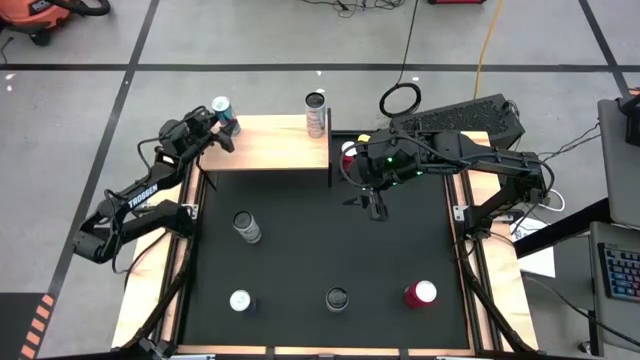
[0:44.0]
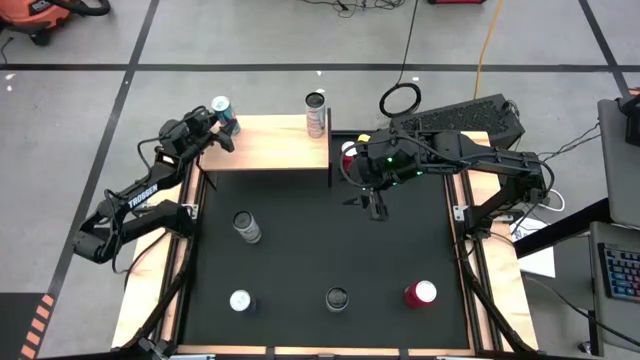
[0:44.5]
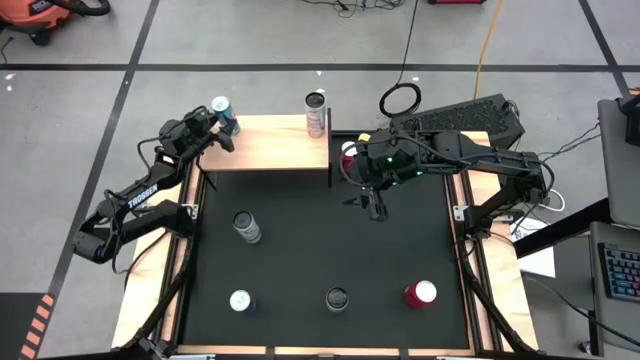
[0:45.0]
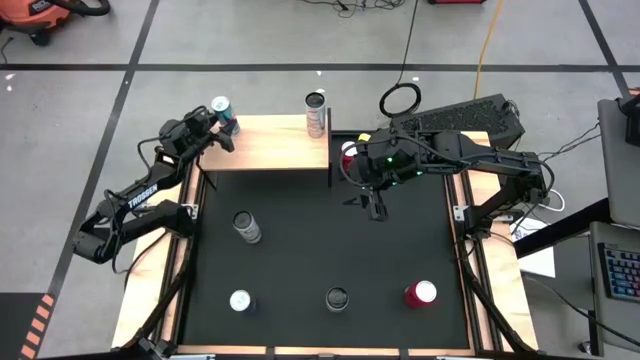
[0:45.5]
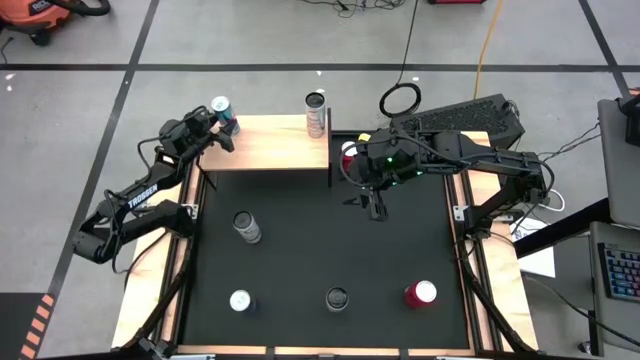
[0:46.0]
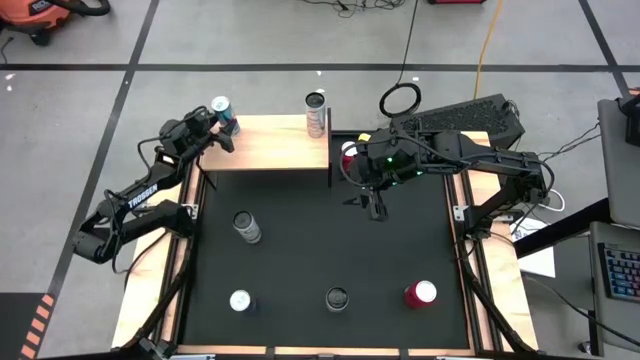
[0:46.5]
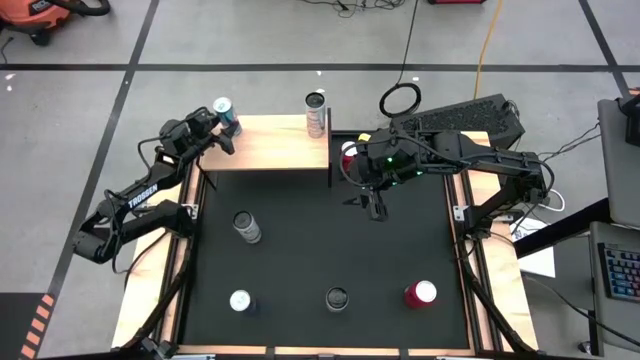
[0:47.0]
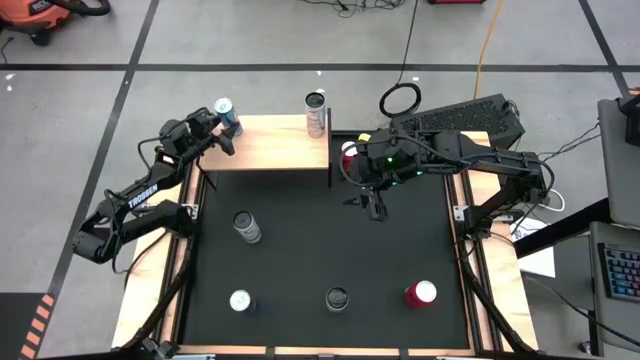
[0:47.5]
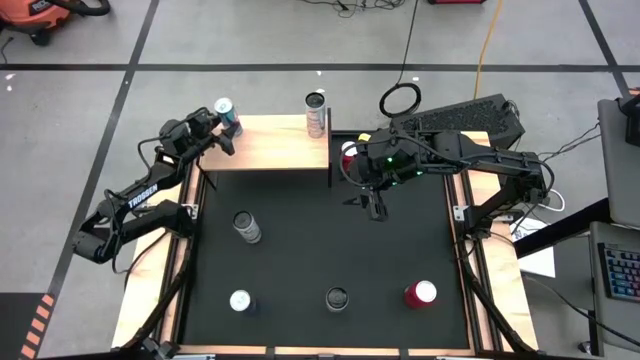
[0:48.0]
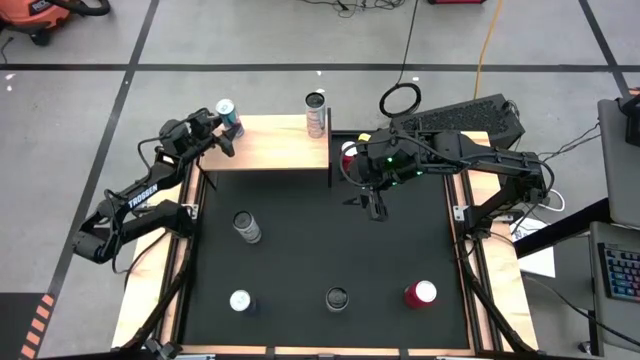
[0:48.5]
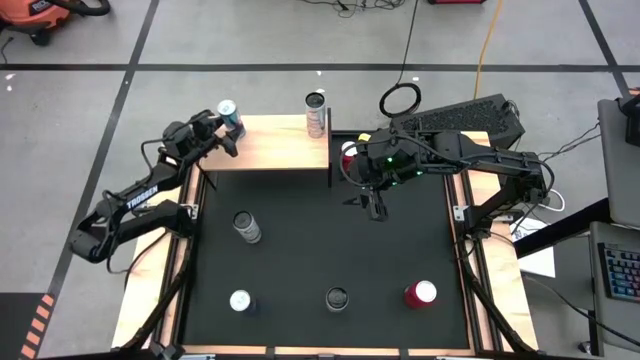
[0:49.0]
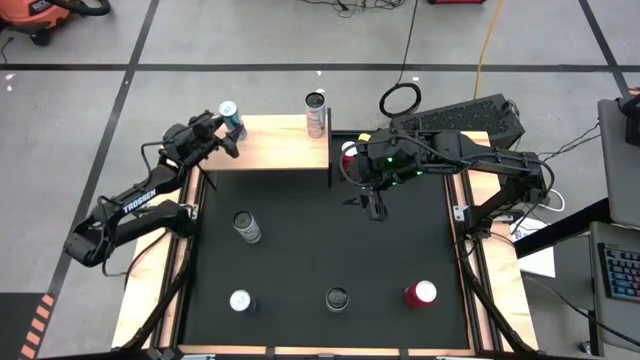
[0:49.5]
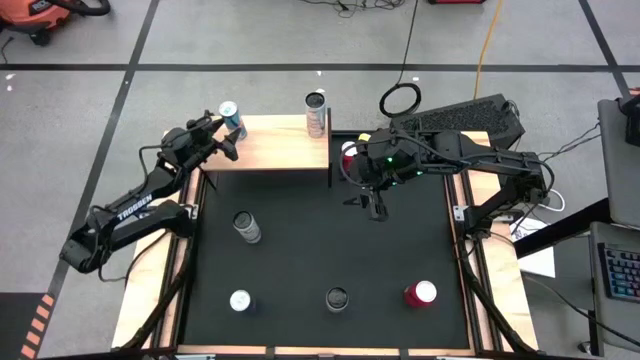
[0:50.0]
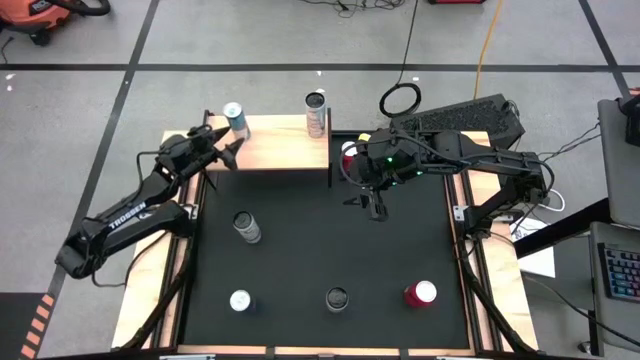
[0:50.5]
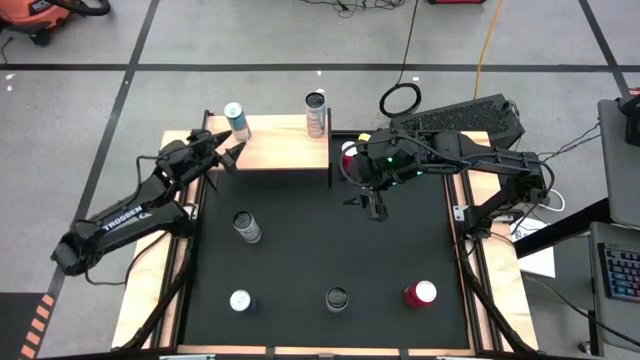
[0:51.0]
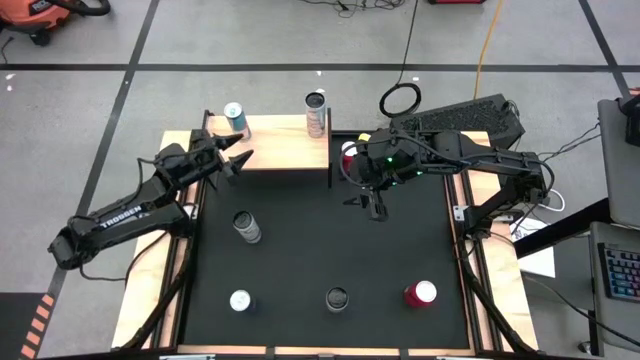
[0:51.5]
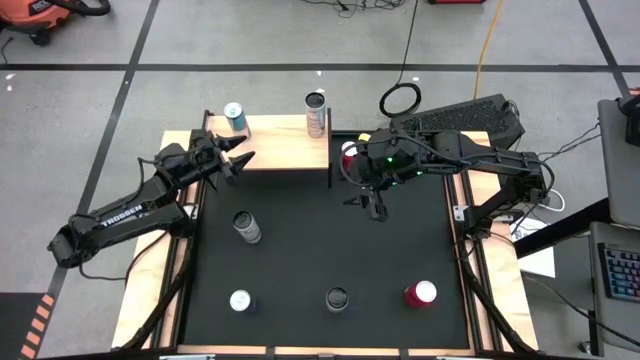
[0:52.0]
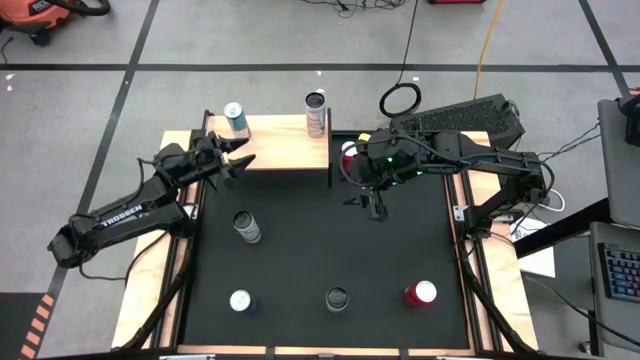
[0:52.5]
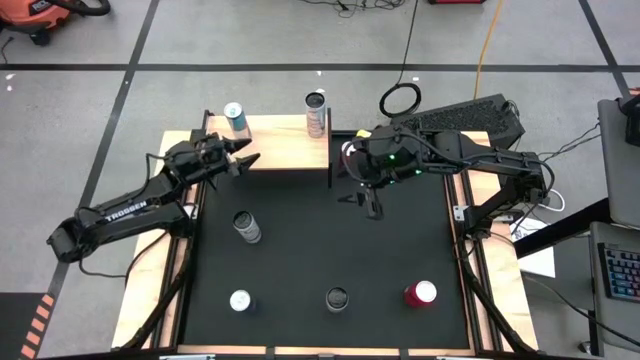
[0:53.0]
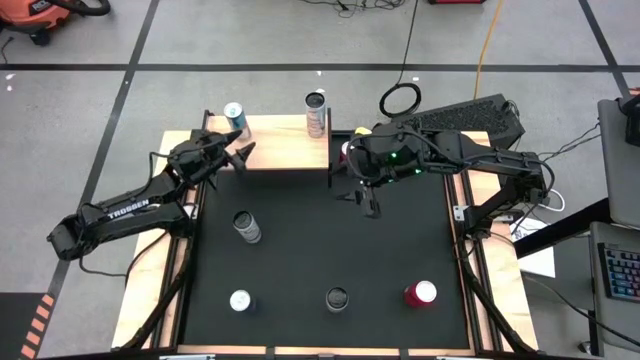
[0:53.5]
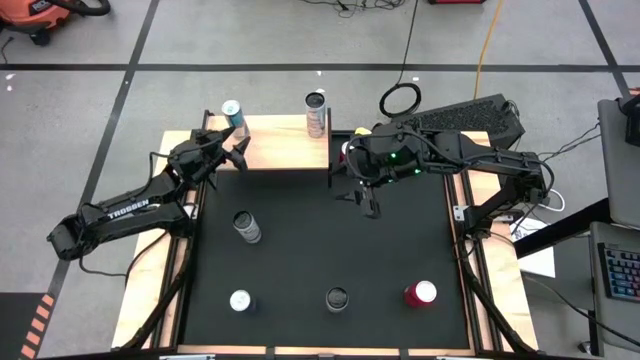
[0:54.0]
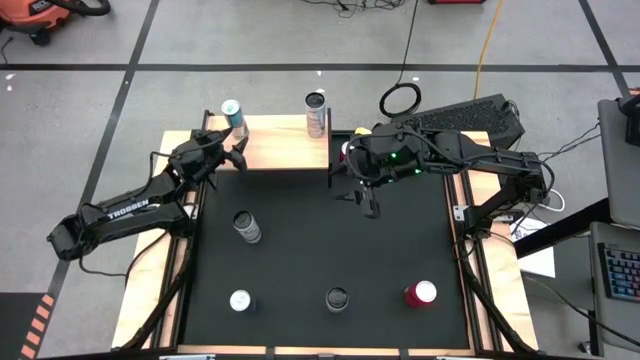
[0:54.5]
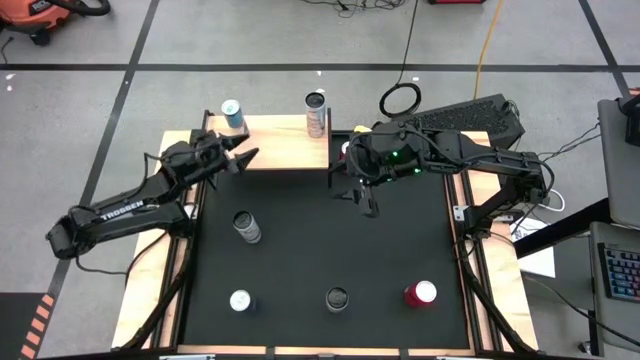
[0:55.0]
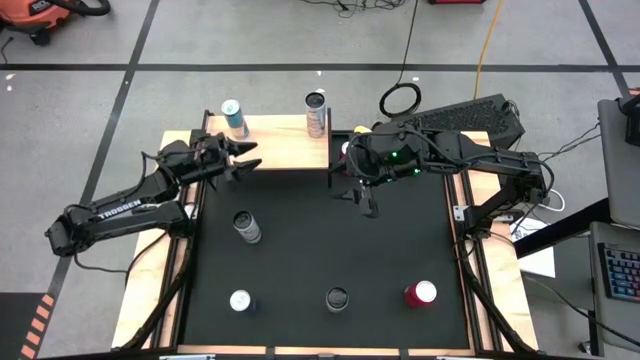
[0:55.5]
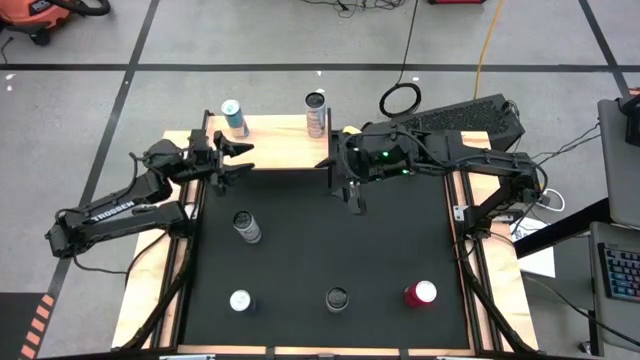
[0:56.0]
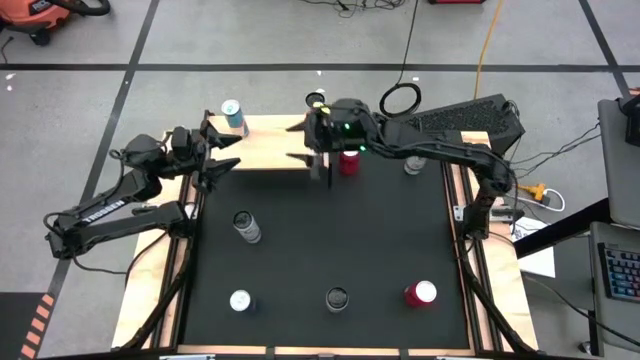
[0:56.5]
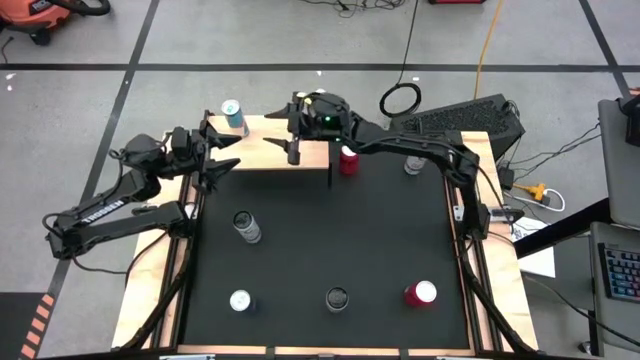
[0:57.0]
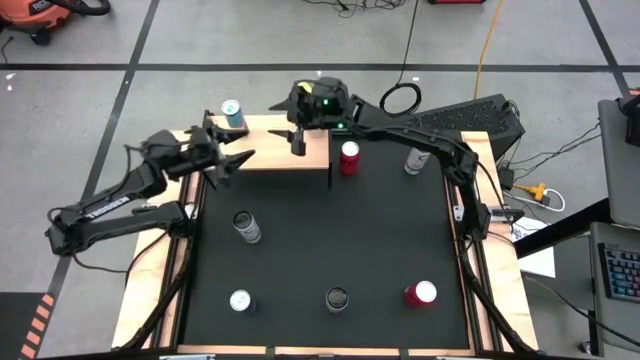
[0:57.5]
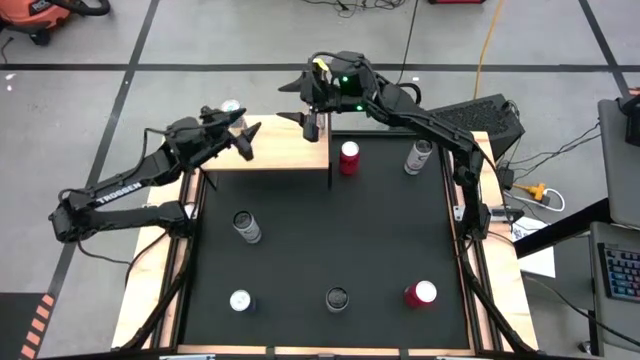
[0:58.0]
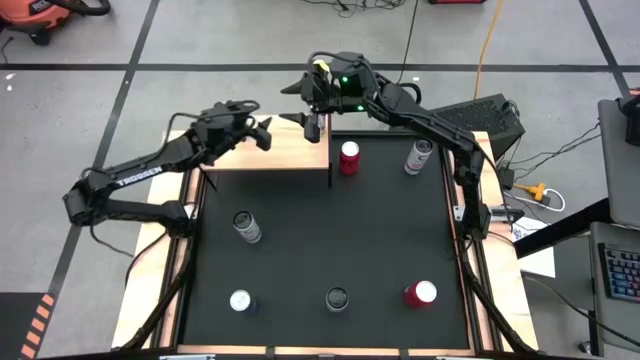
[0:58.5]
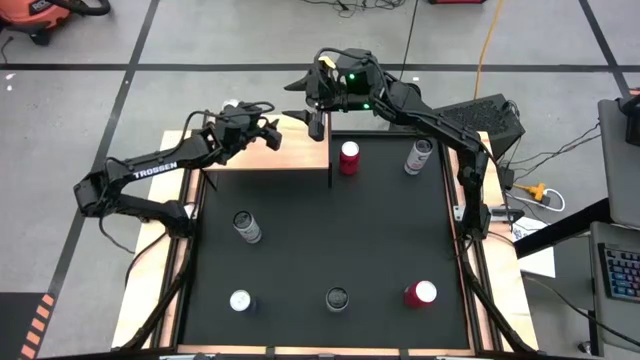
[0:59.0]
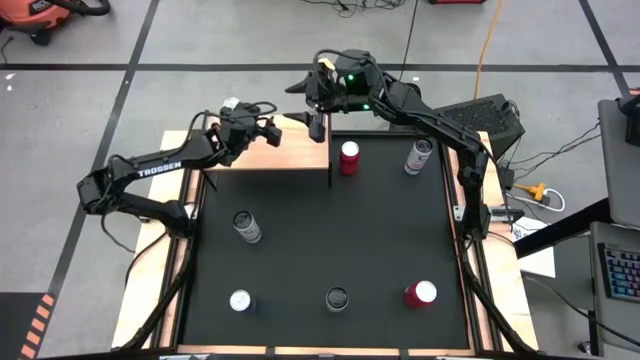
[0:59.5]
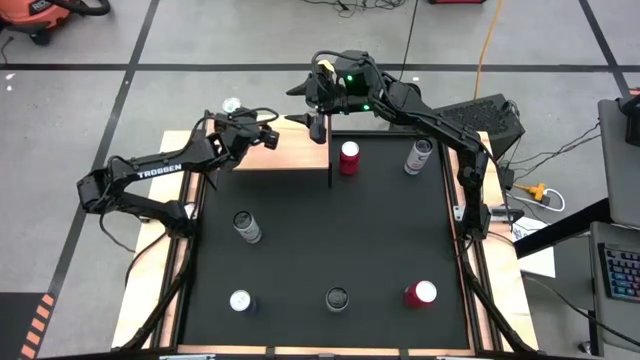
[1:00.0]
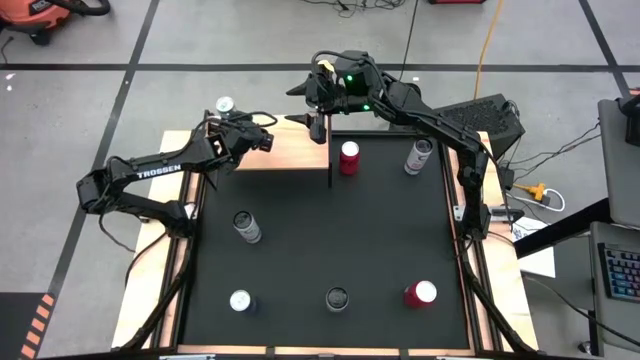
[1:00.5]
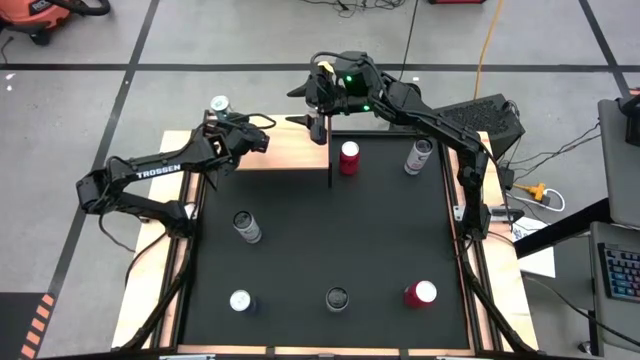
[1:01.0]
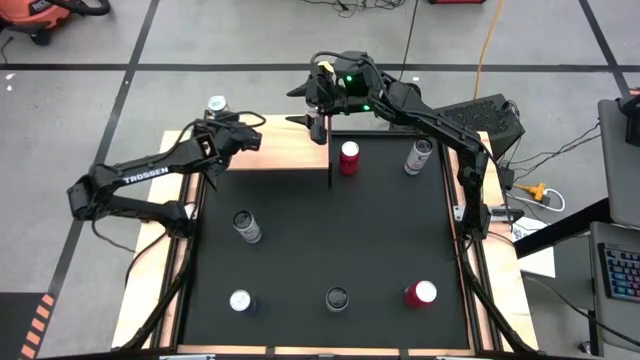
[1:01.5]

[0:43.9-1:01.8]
Task: Place canned beverage on shelf
Put the top blue soda can on the shelf
